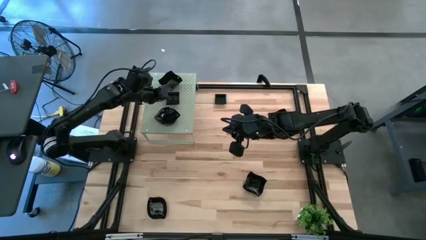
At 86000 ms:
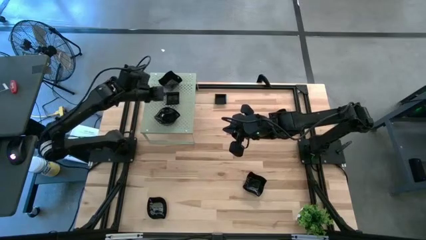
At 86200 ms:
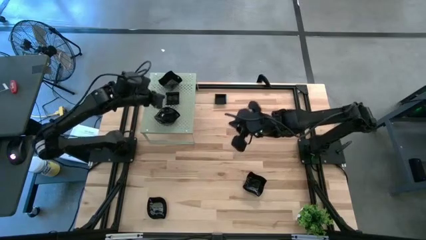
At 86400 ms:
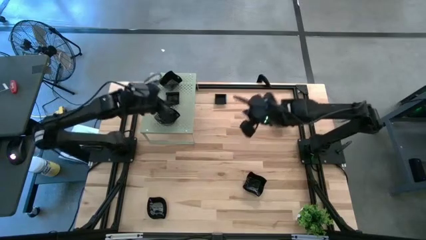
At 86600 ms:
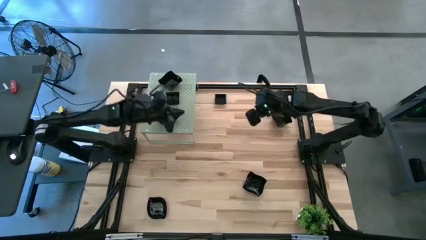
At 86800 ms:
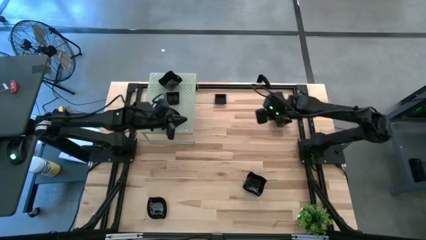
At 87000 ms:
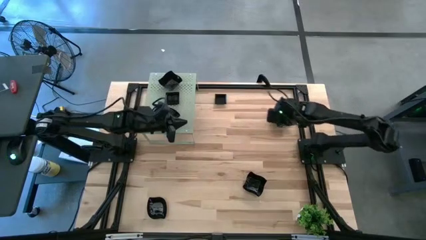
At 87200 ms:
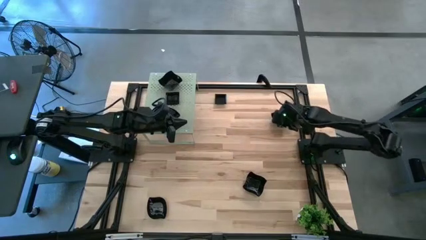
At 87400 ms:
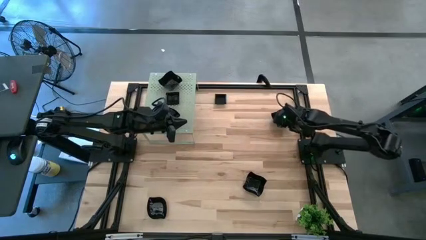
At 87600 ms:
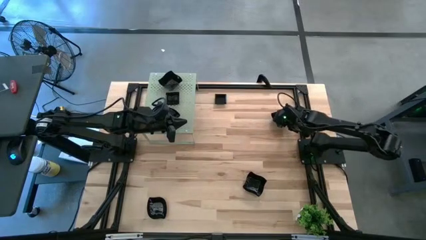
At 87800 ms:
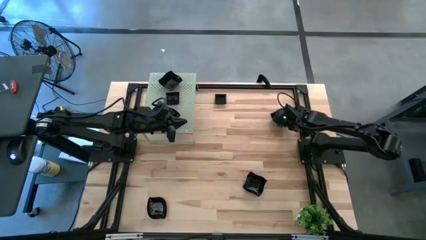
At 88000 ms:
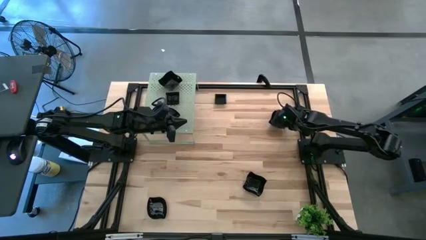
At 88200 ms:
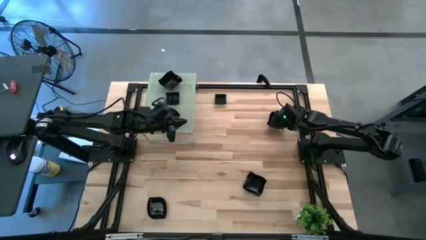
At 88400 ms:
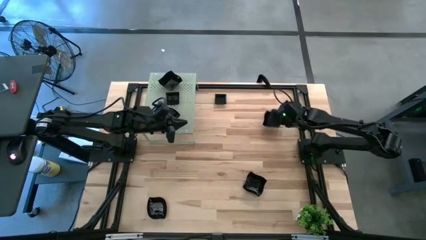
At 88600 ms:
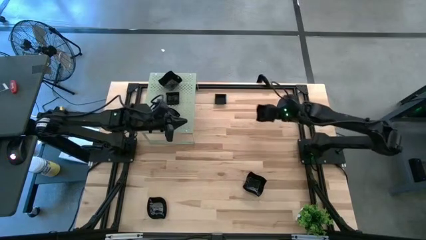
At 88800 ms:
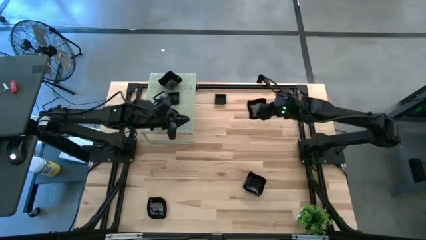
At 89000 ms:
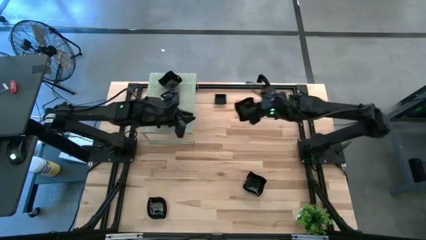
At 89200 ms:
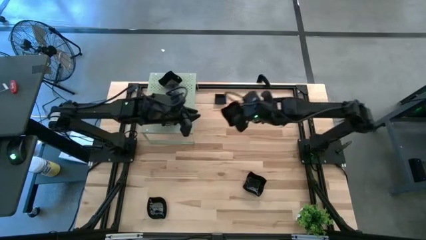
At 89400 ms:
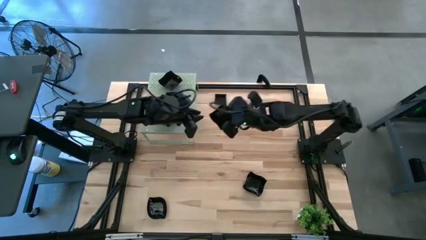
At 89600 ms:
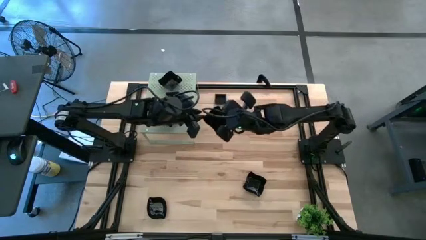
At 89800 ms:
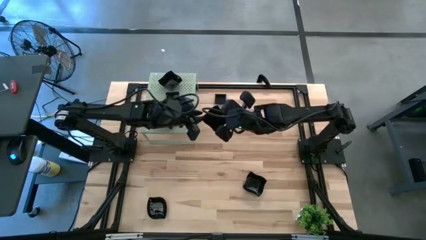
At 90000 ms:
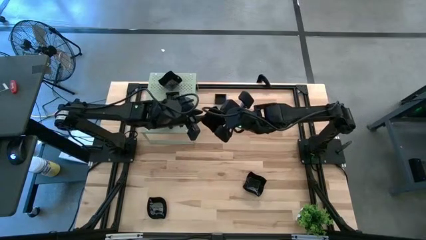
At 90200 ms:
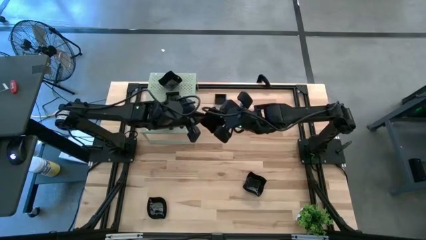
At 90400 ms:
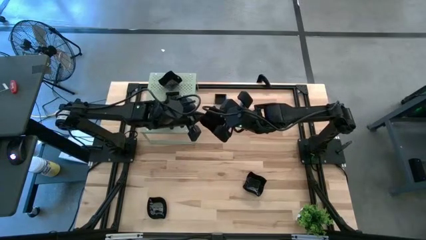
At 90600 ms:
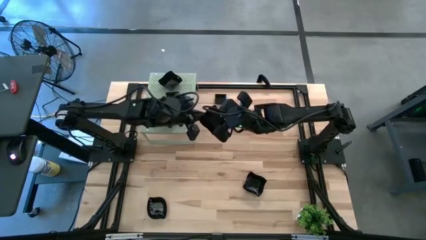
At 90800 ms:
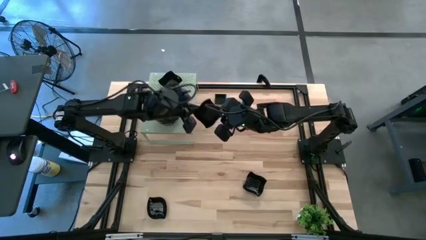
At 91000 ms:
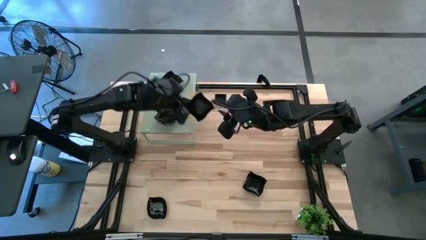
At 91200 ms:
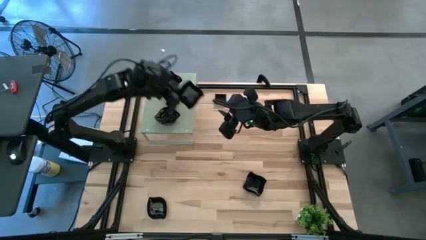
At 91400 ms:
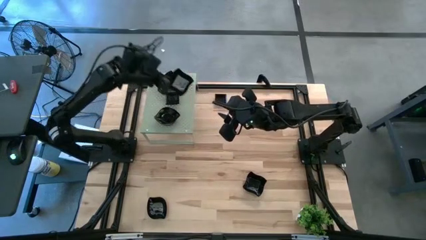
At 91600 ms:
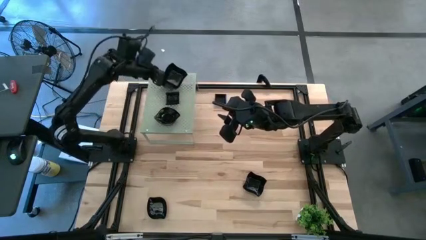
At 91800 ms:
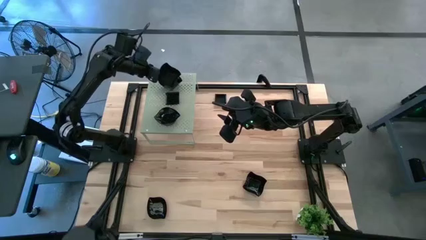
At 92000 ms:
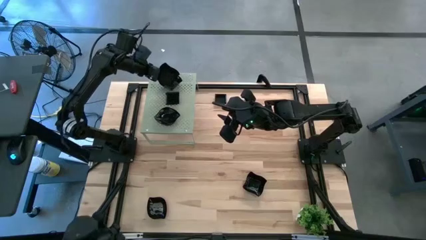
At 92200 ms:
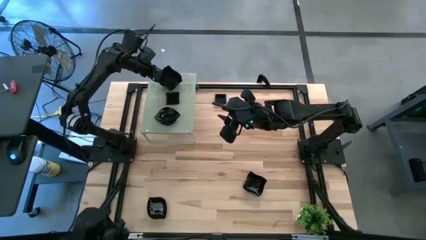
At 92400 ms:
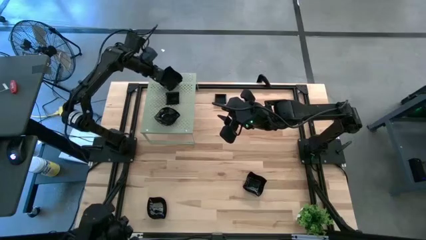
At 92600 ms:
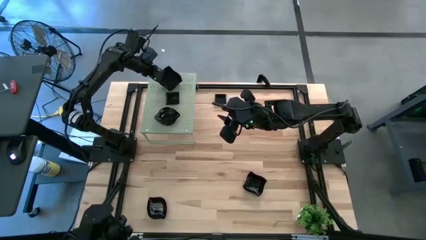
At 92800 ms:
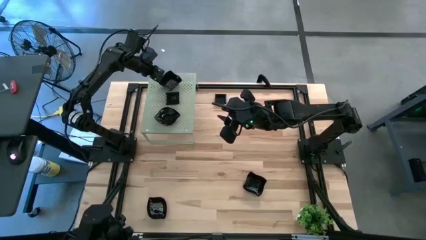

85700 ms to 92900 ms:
Task: Pick & Place Mini shaped plates
Stack the distorted square plate on the other distorted square plate on the shelf

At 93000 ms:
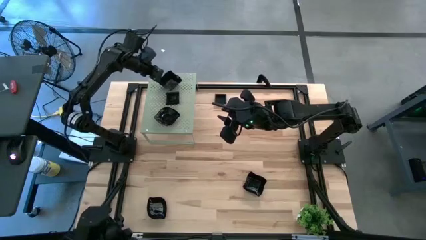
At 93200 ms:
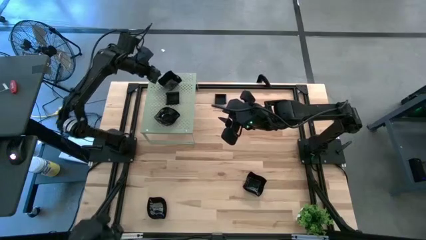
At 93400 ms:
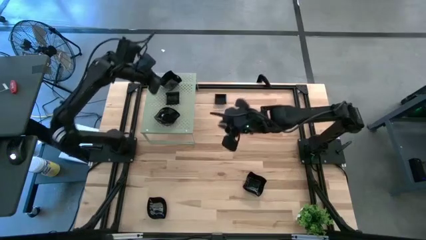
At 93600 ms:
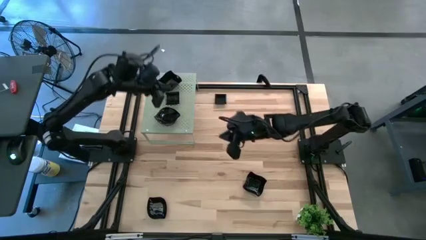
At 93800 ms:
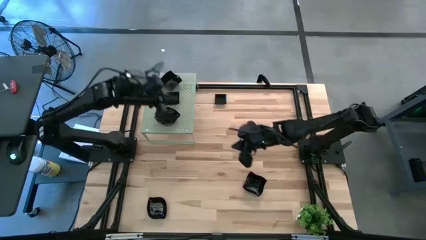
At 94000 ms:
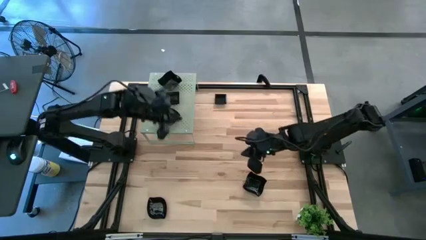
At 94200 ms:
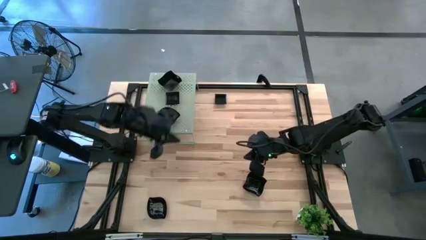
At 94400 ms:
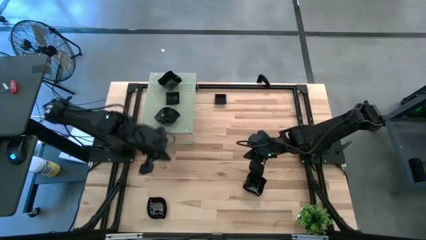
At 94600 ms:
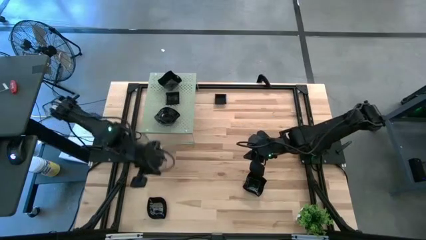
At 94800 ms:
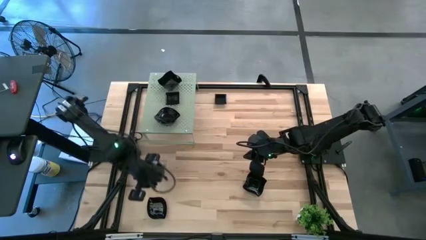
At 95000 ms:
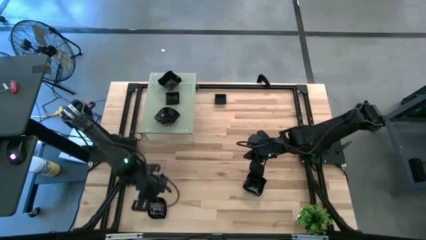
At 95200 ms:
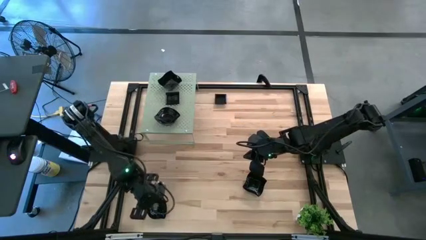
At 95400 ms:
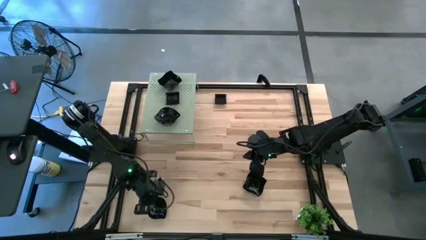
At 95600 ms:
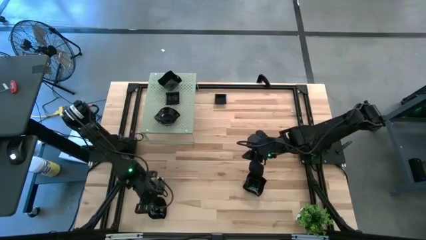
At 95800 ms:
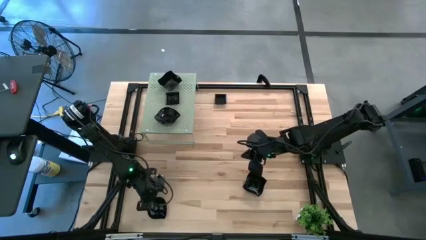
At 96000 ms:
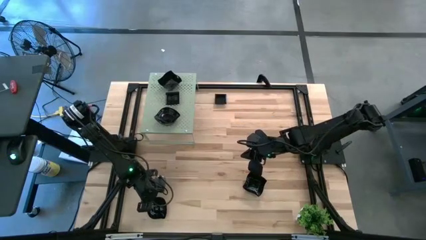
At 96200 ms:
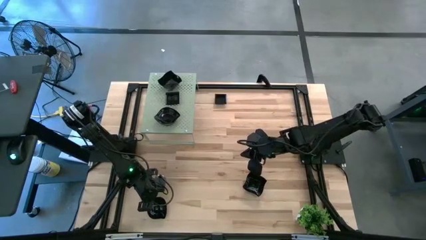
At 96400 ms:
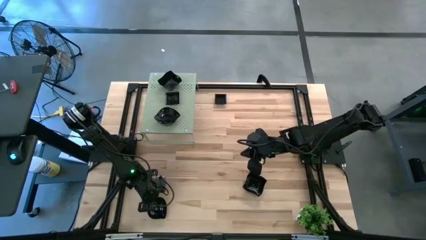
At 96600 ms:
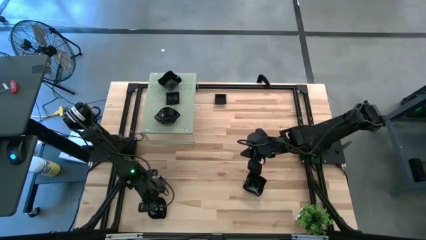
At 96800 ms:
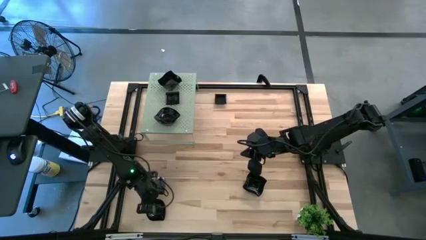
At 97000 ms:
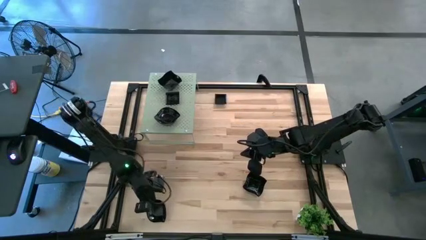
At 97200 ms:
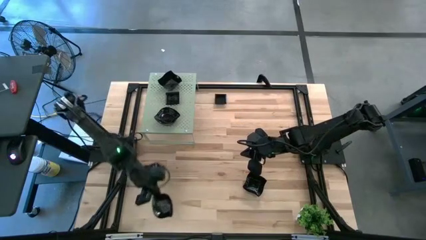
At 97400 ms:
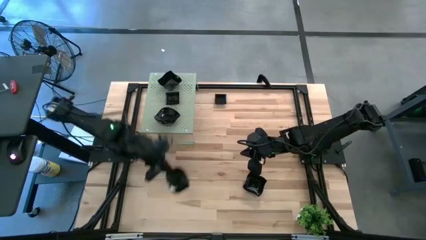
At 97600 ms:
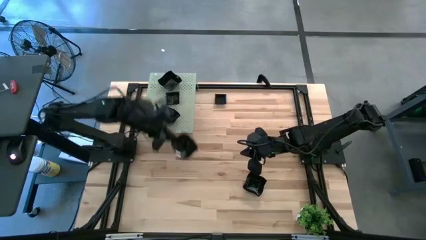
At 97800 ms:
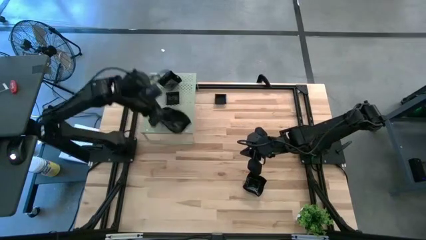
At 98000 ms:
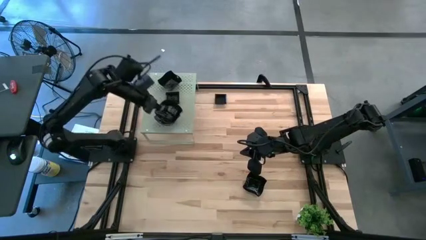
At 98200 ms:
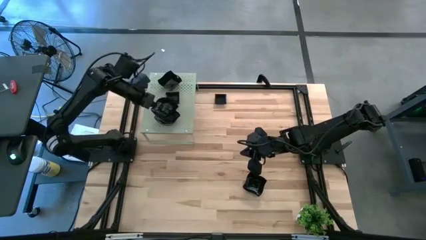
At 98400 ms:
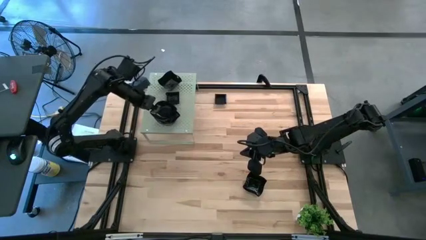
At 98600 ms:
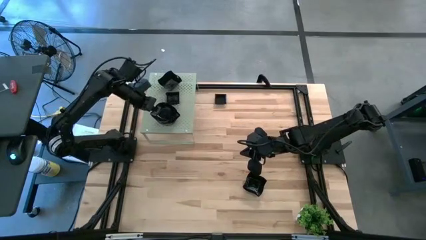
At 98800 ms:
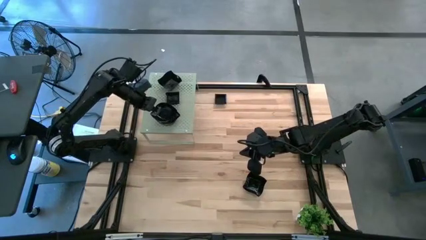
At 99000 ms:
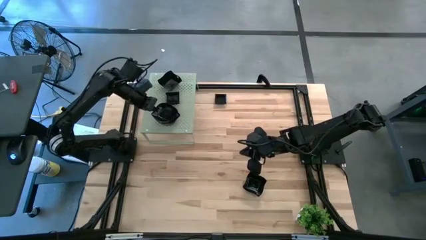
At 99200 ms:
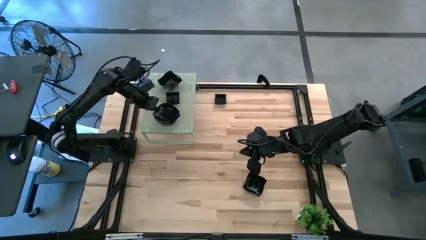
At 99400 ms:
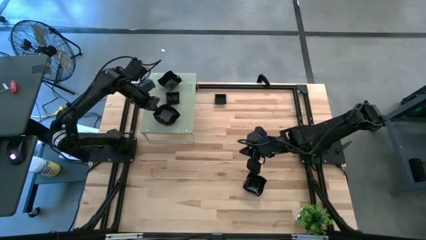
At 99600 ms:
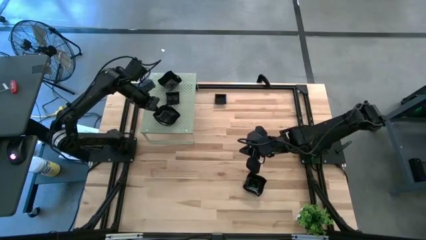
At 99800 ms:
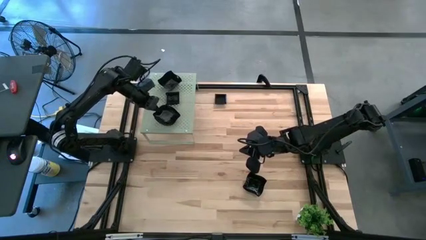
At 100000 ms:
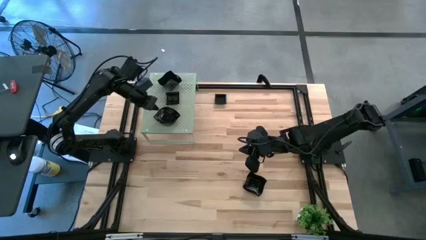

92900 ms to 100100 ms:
Stack the leaf-shaped plate on the other leaf-shaped plate on the shelf
